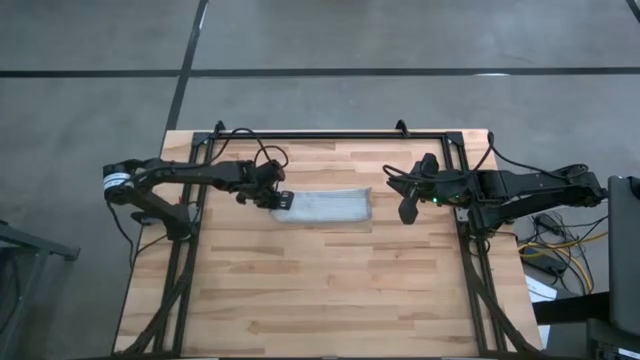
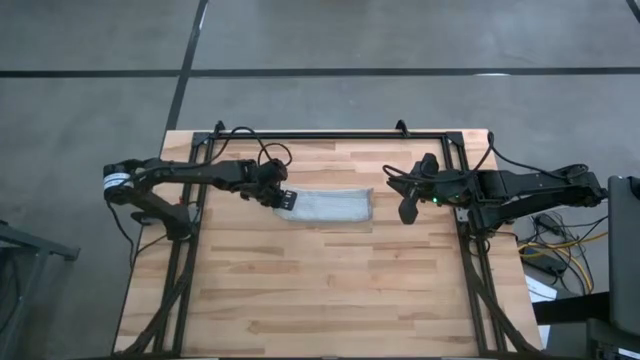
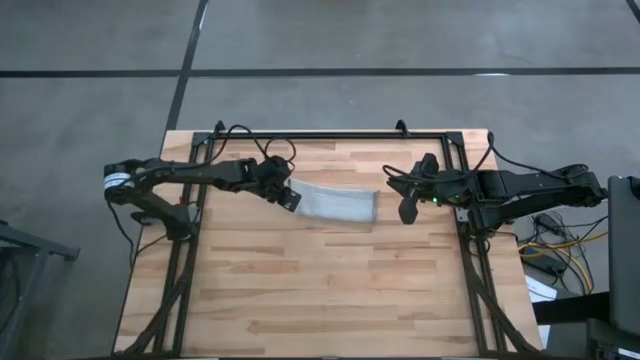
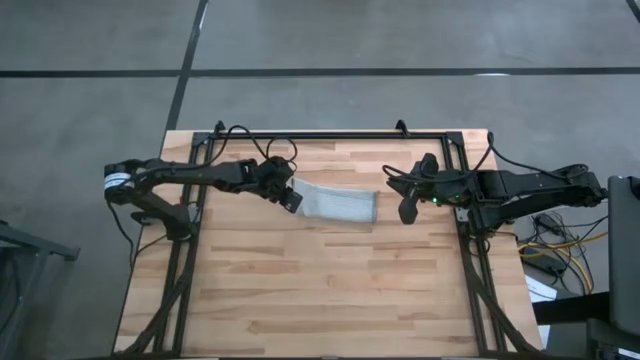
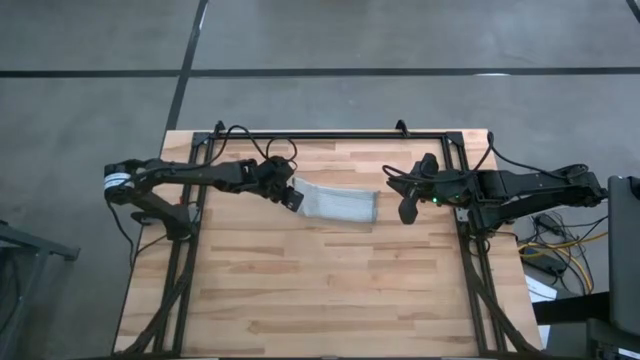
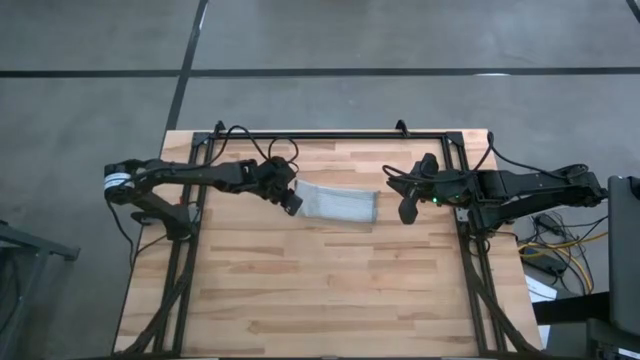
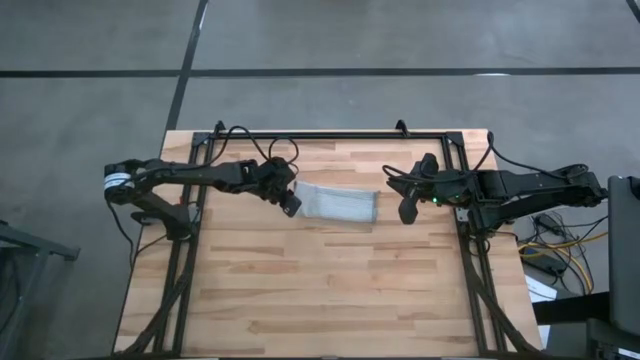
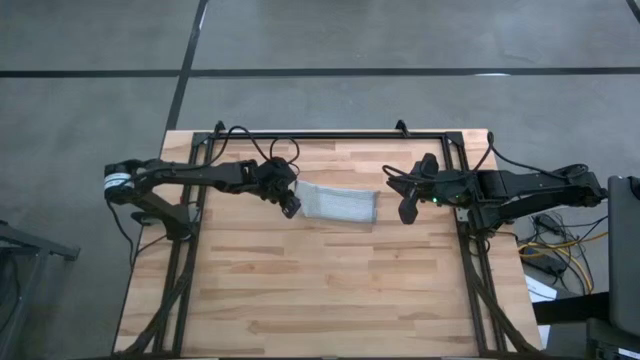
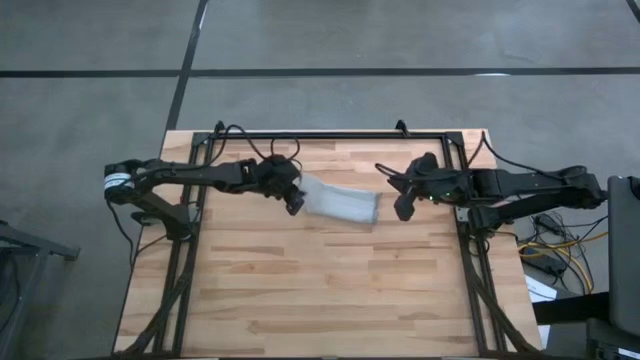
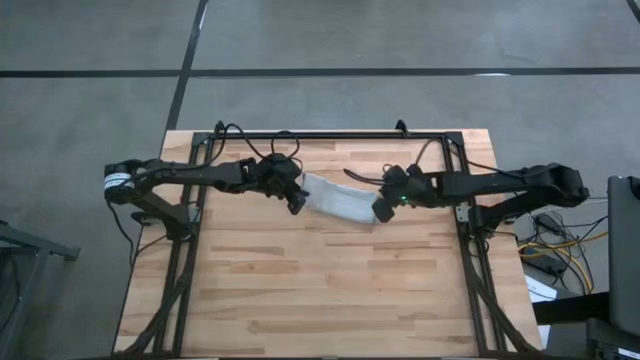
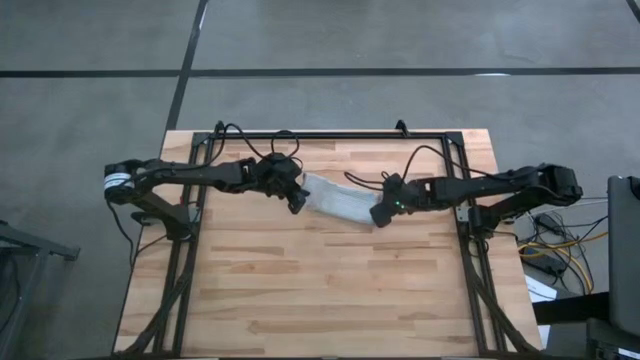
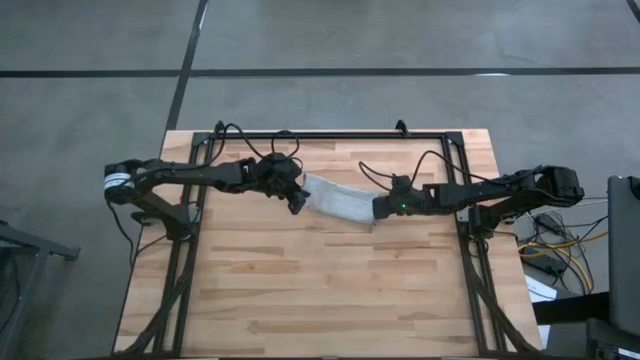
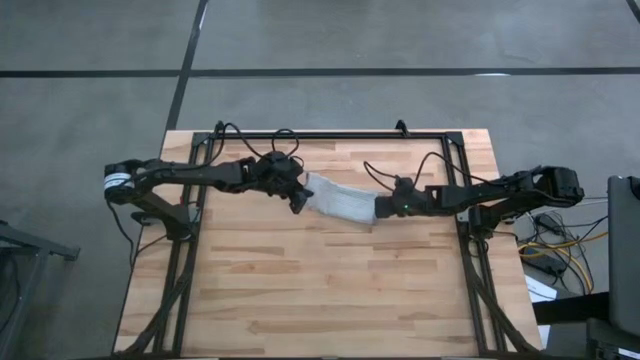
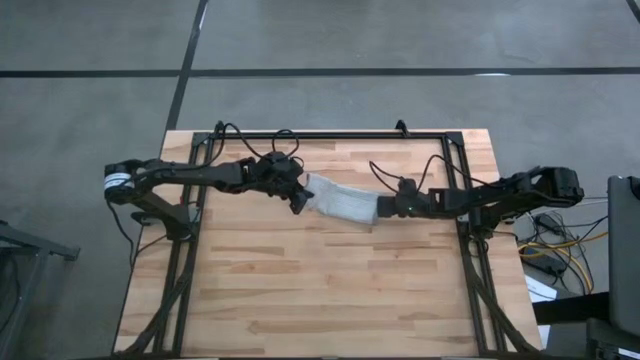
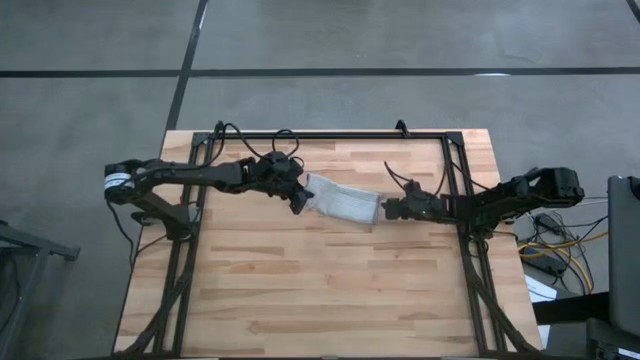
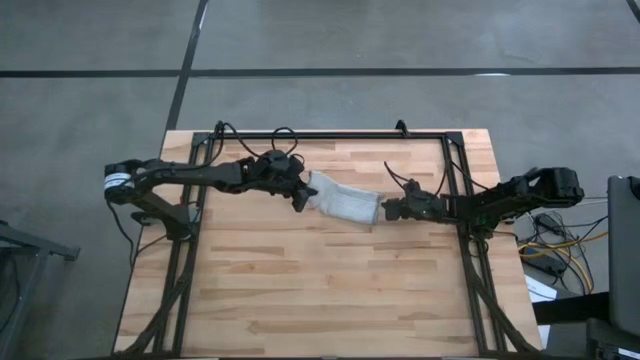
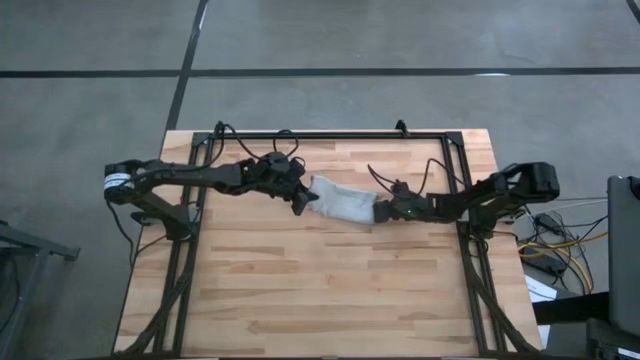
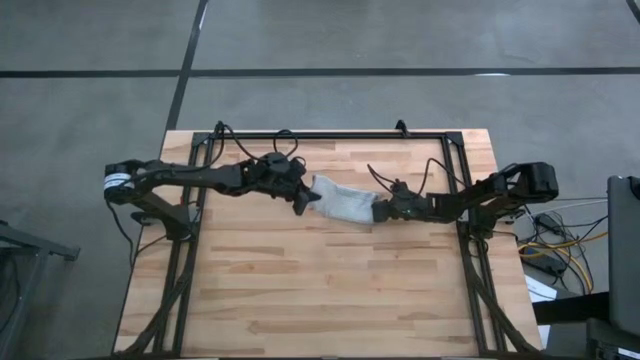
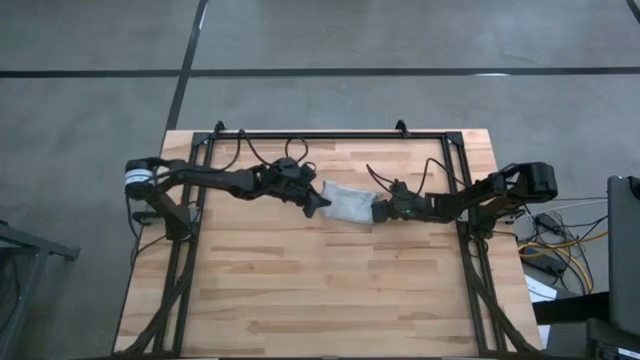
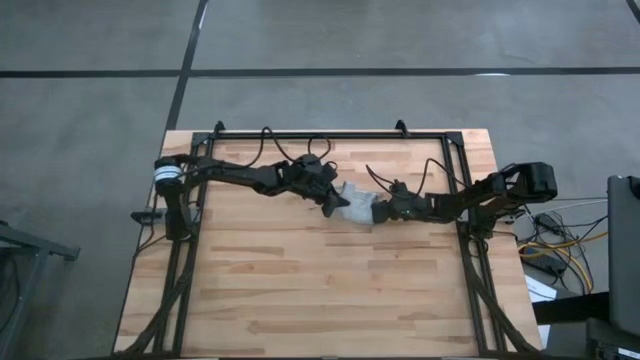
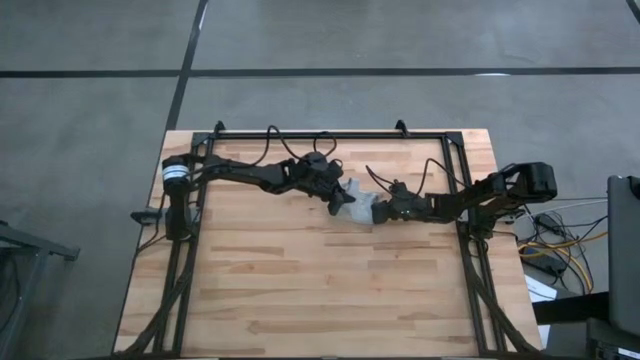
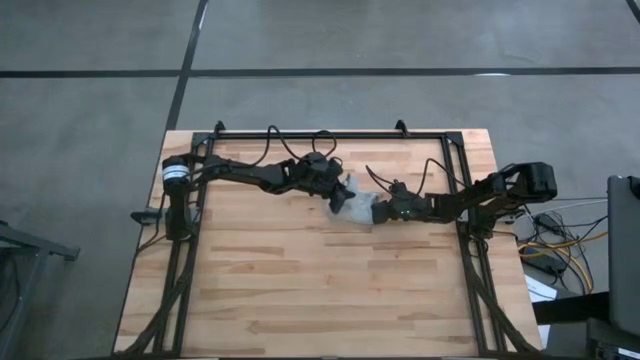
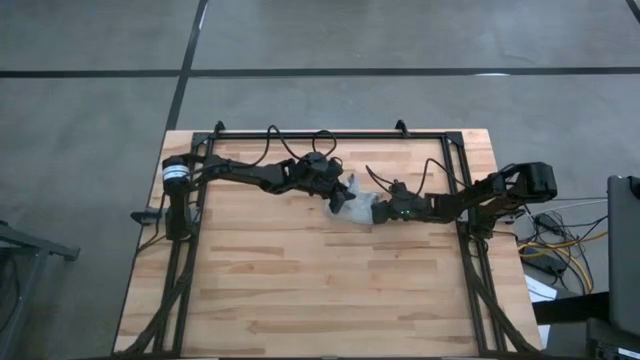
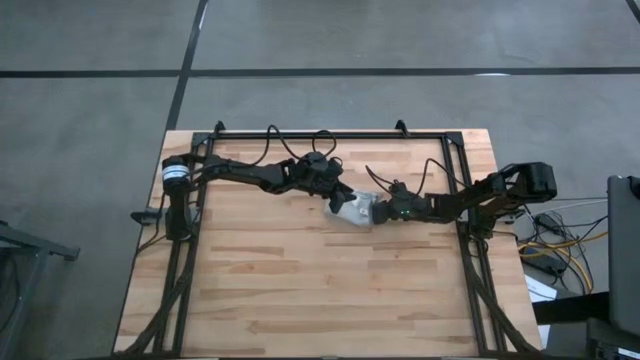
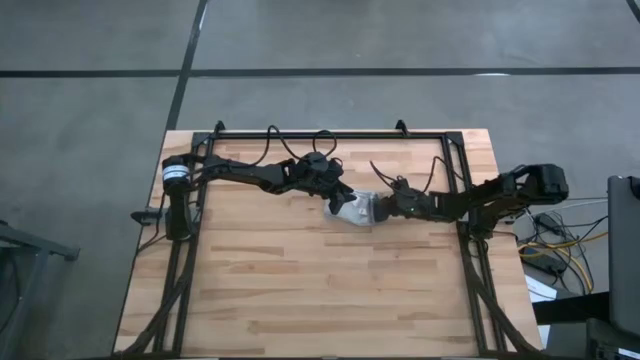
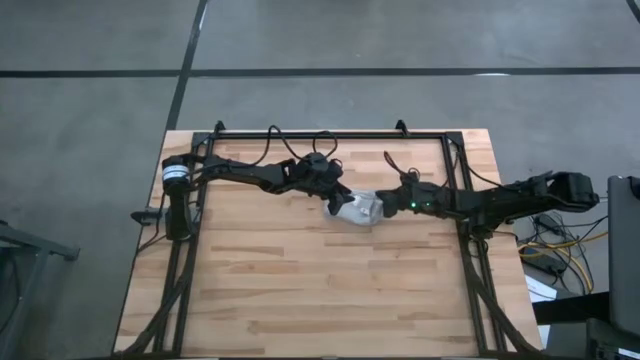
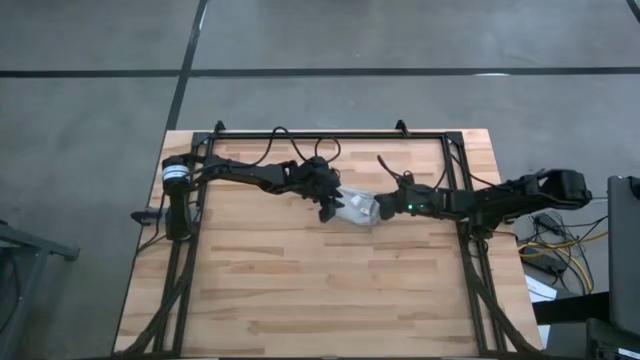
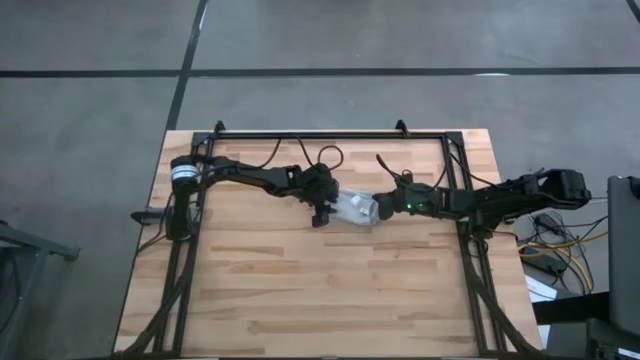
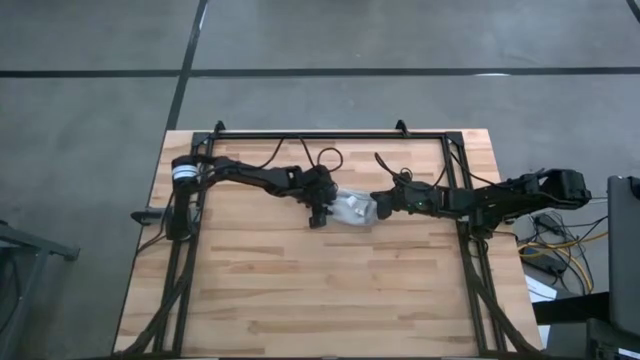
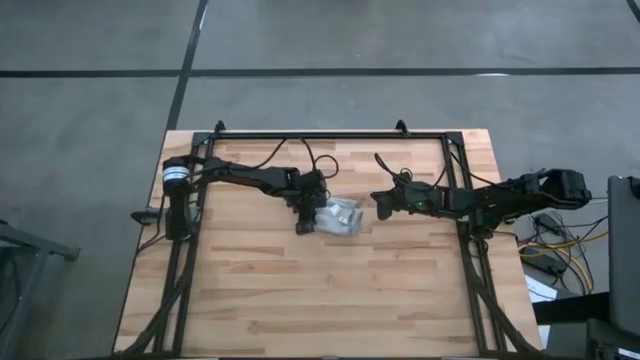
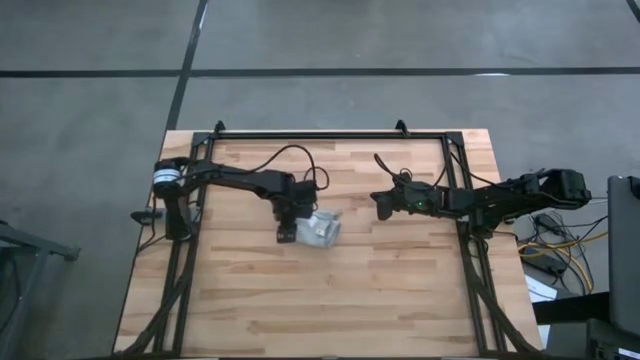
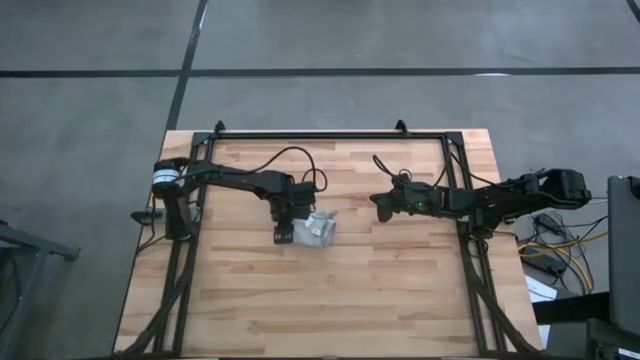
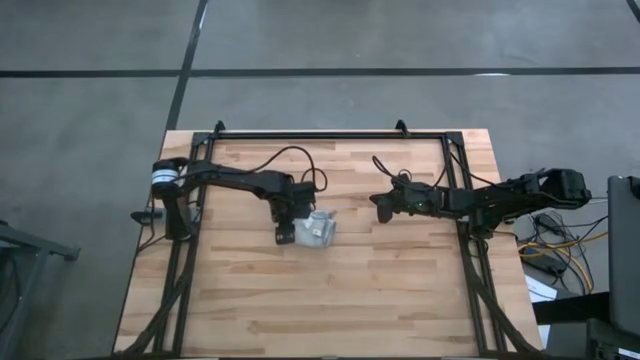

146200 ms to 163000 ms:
Task: Roll towel
Roll the gray towel

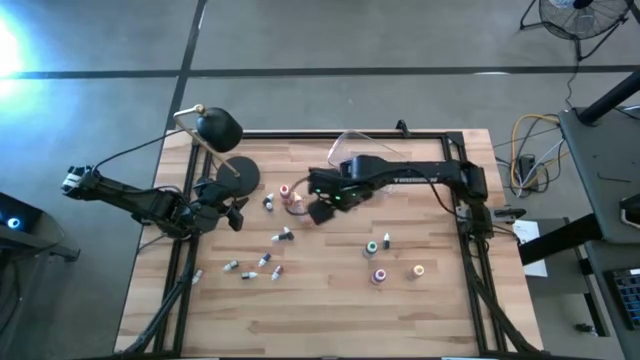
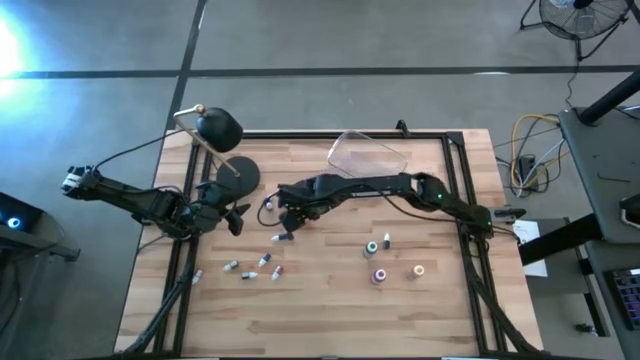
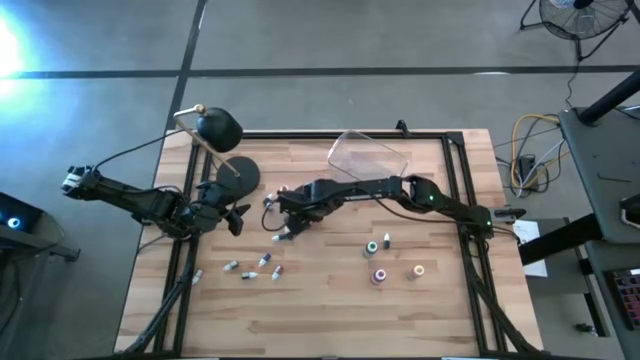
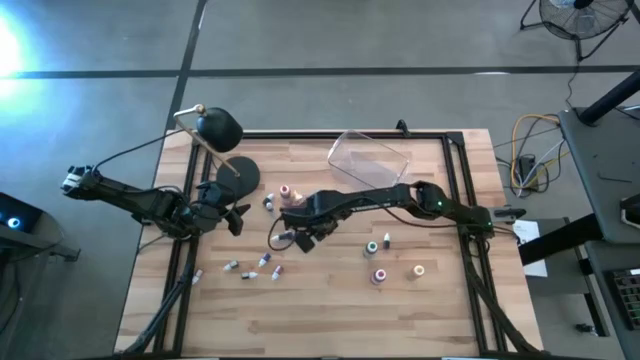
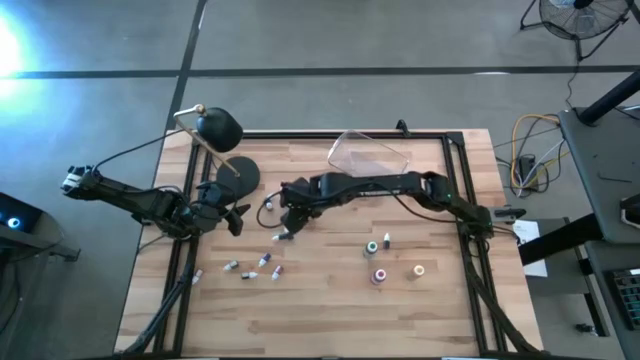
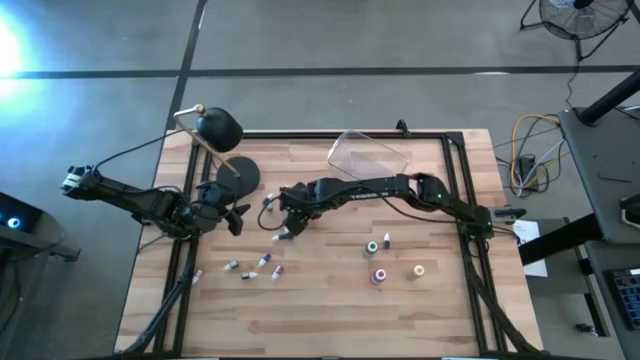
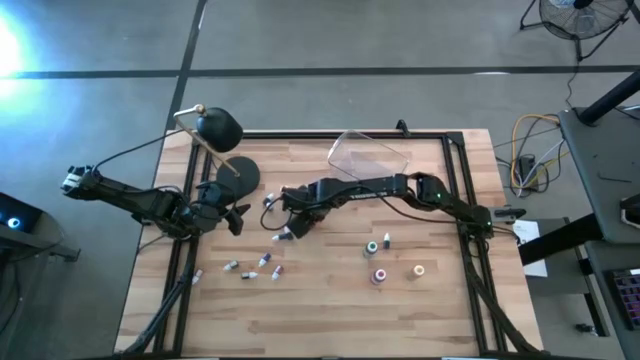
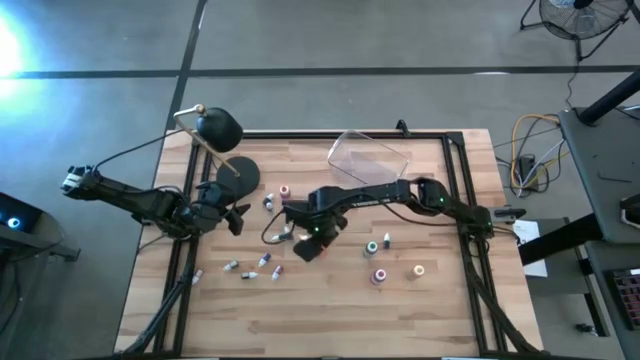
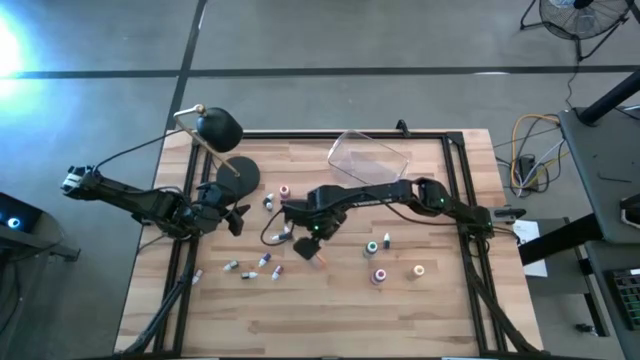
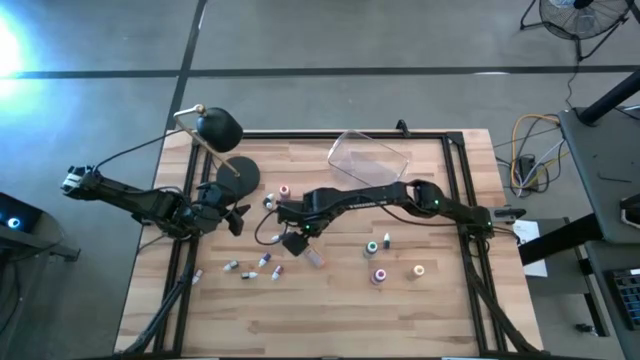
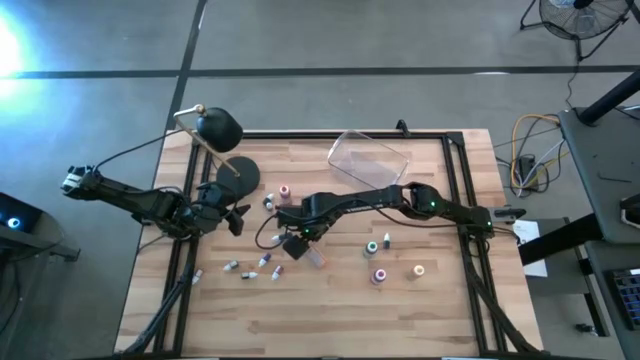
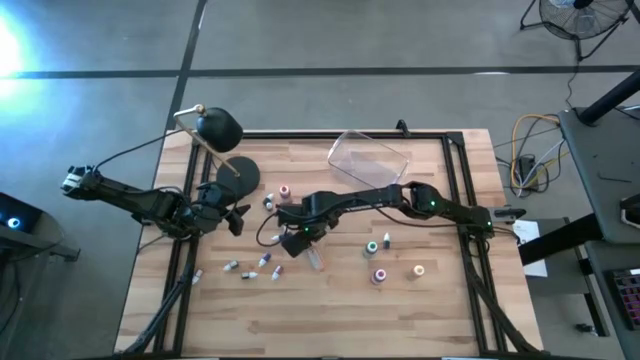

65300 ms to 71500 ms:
Task: Pick & Place food coloring
Adjust the large left yellow food coloring bottle
